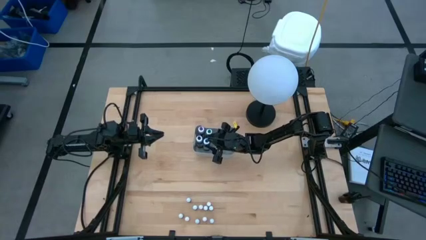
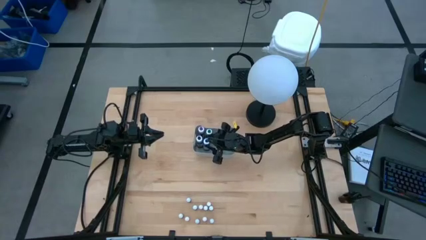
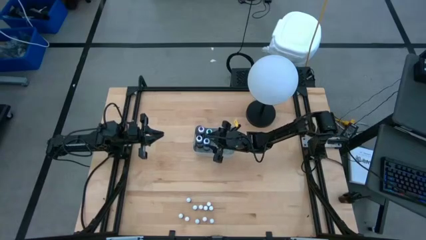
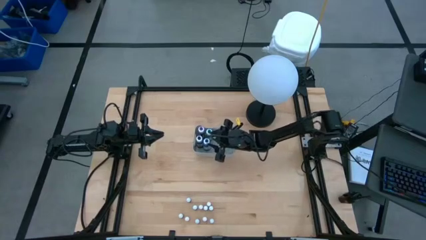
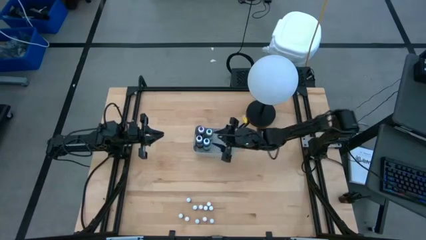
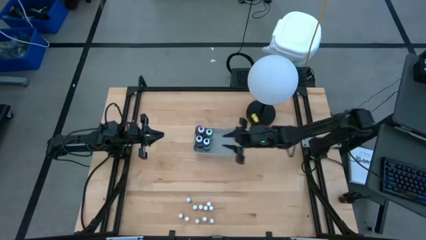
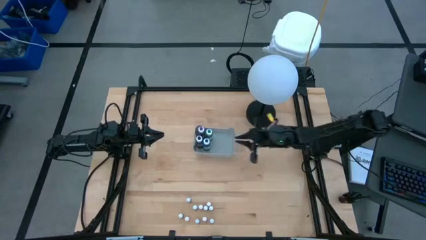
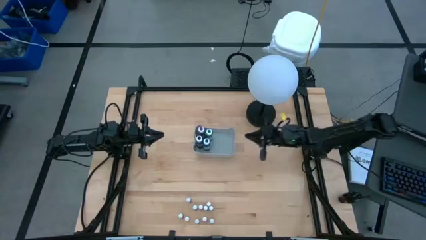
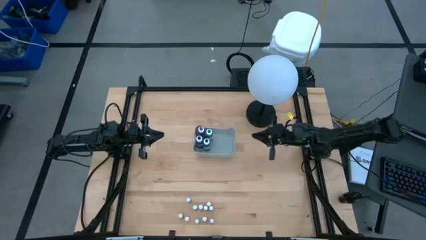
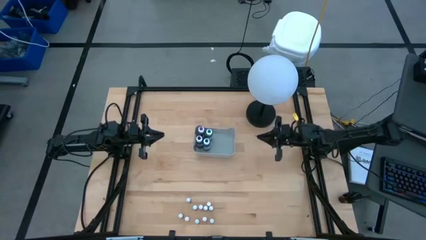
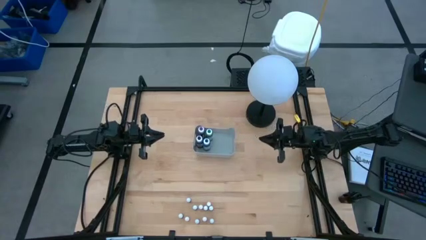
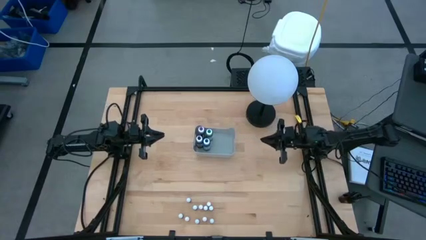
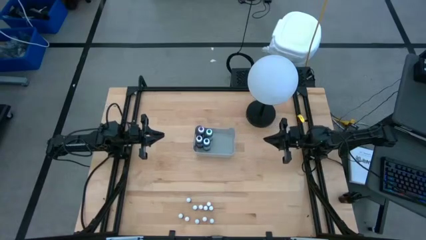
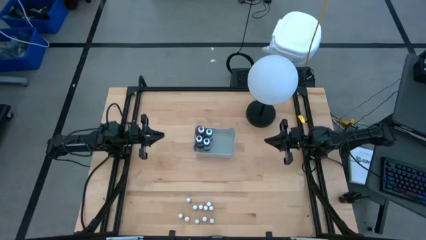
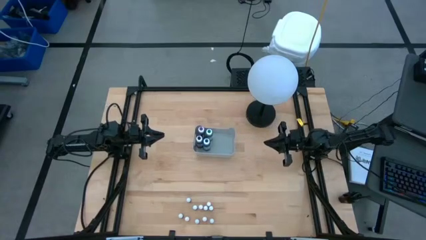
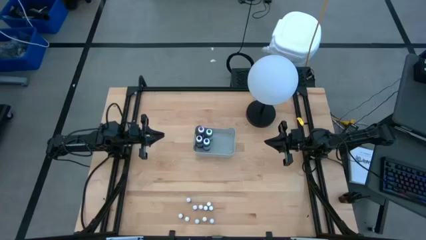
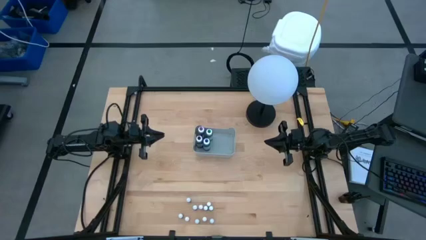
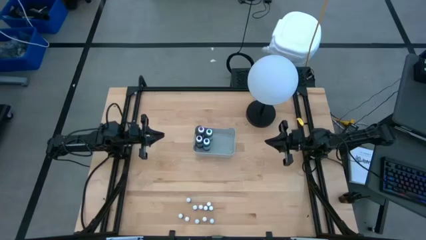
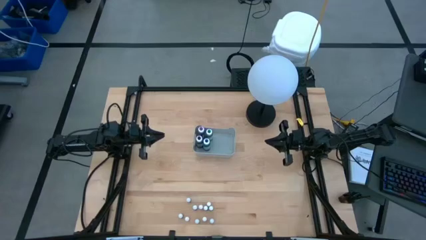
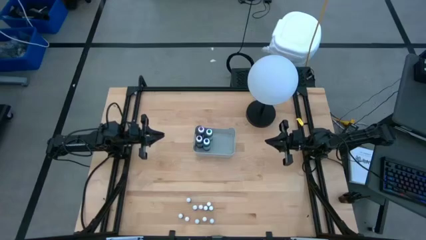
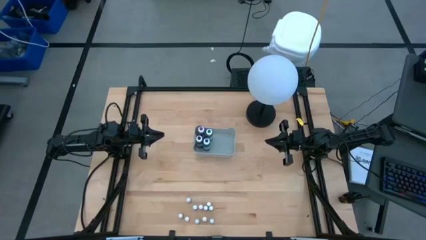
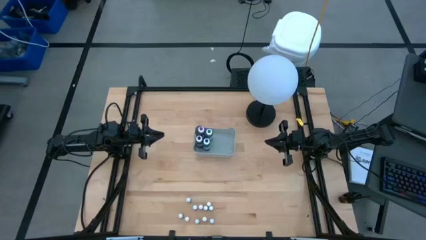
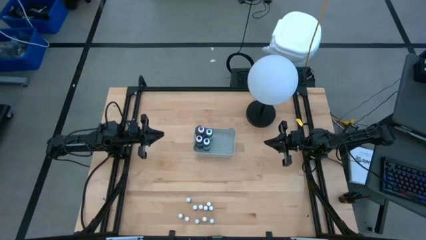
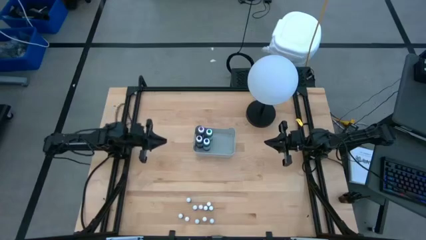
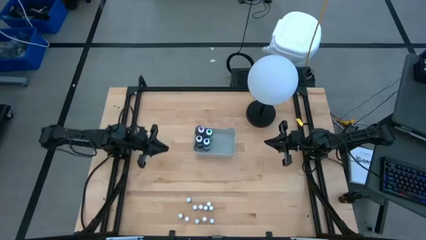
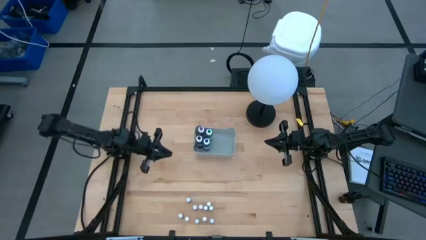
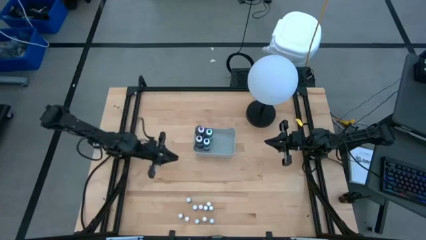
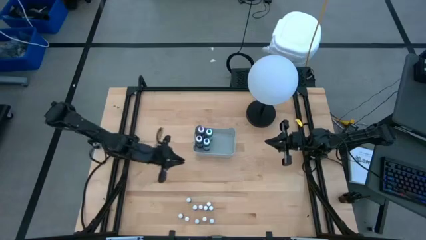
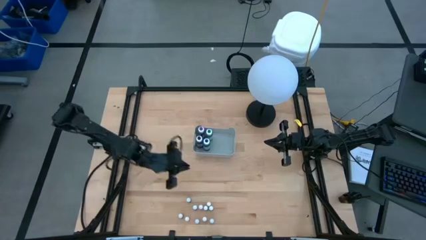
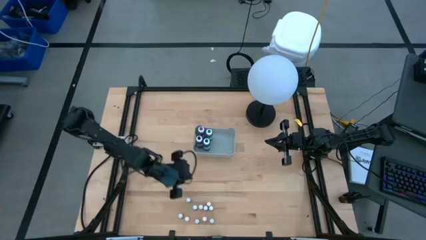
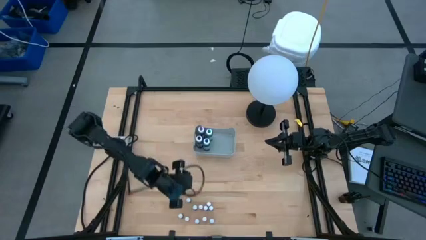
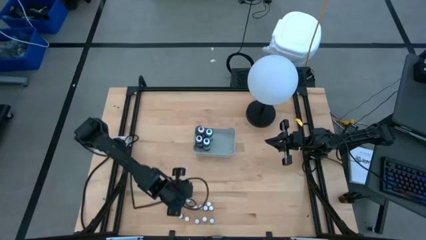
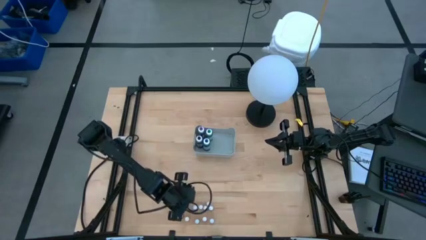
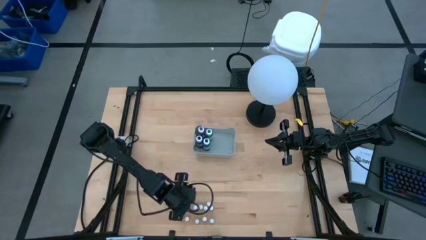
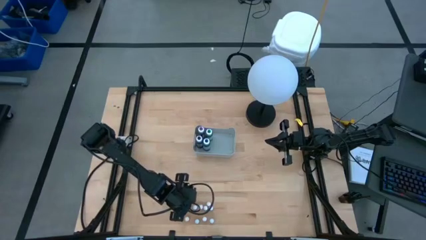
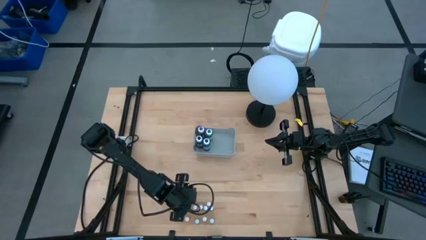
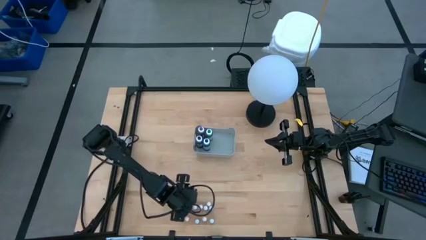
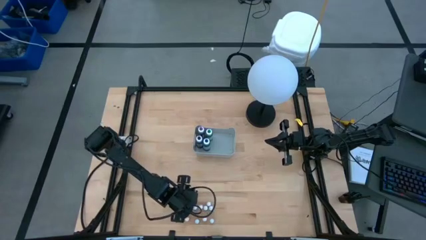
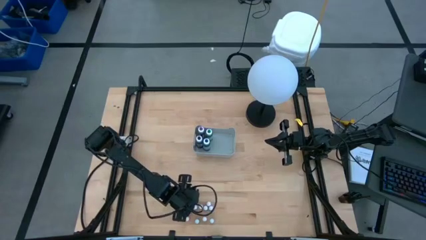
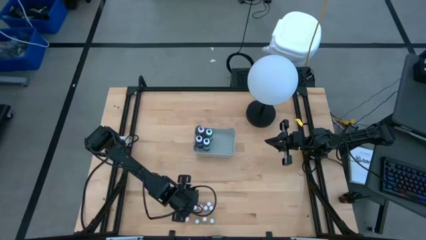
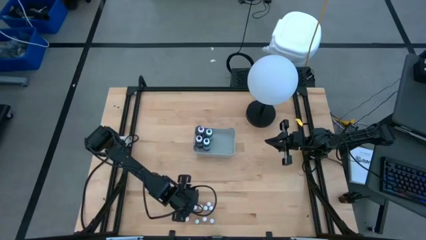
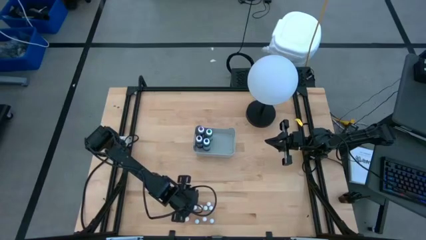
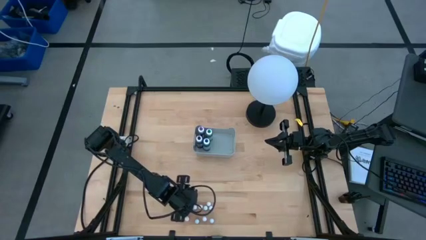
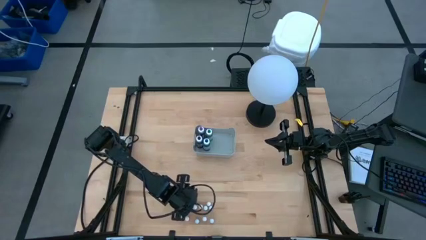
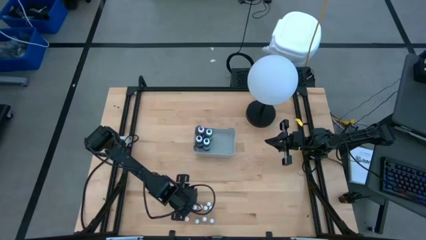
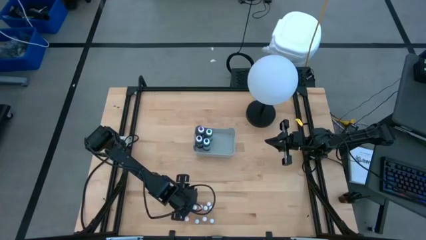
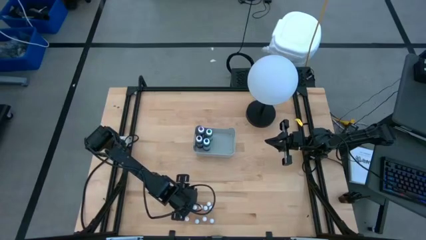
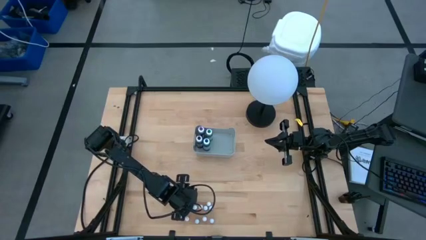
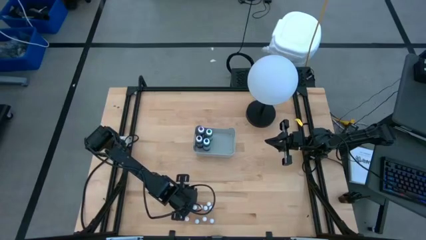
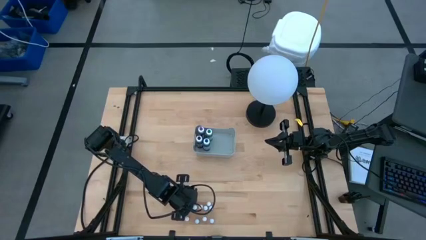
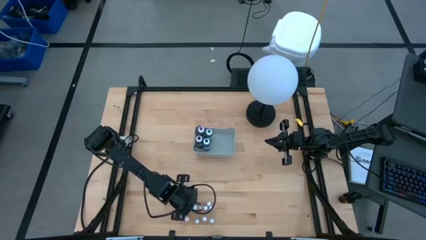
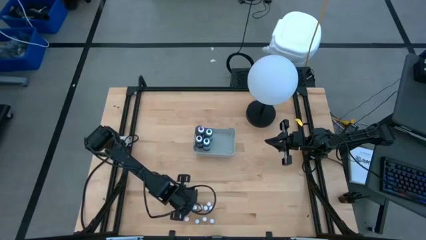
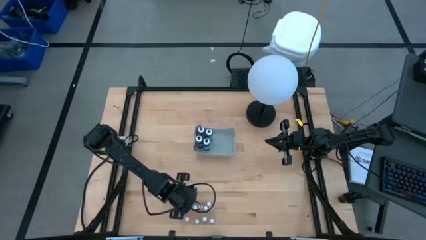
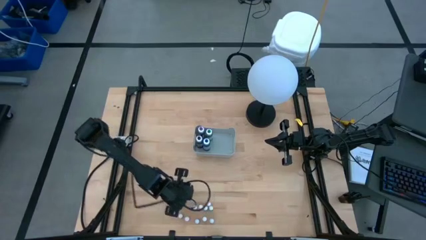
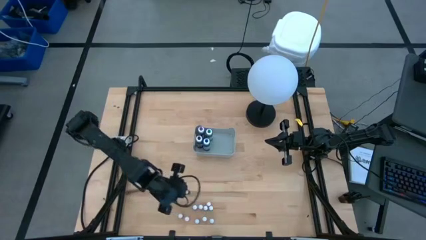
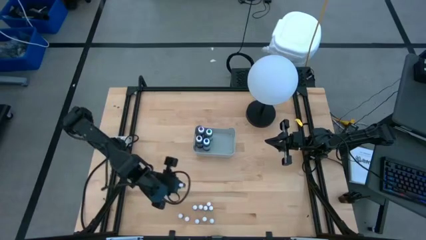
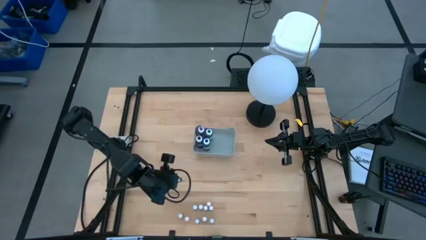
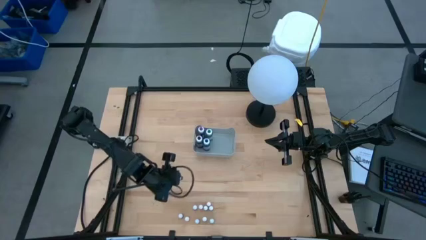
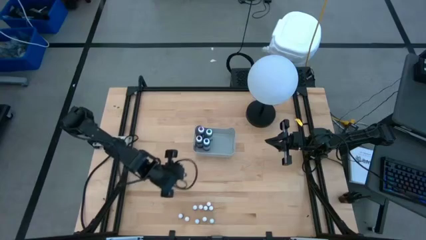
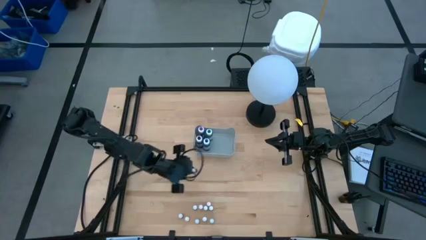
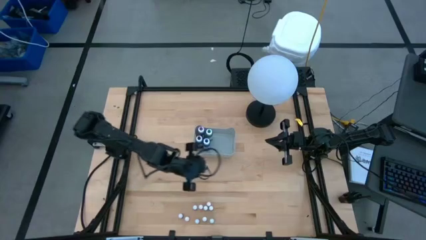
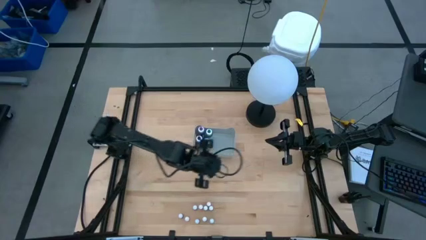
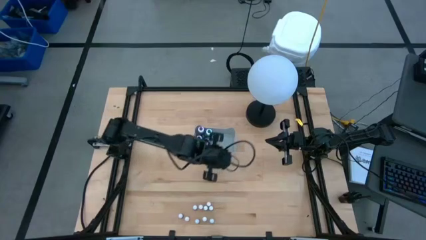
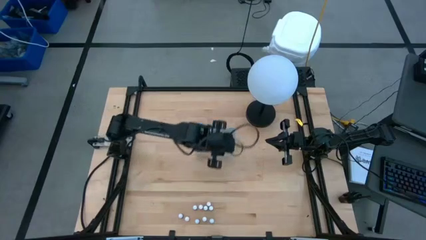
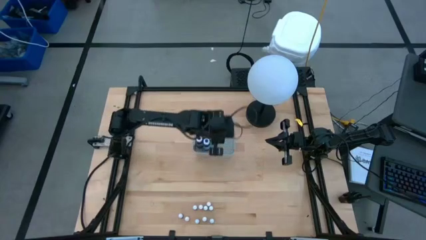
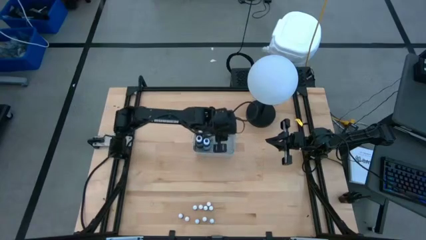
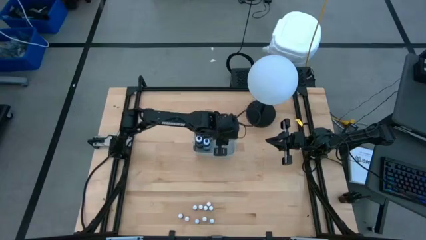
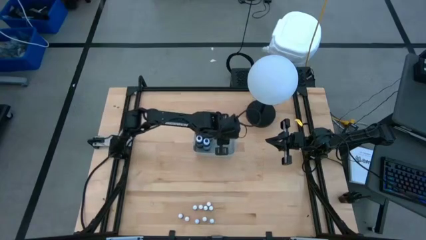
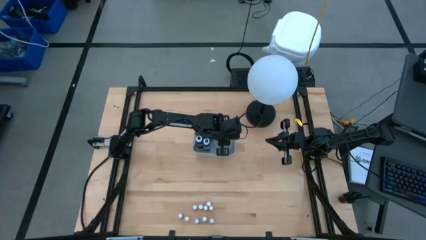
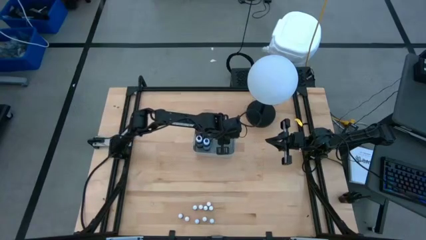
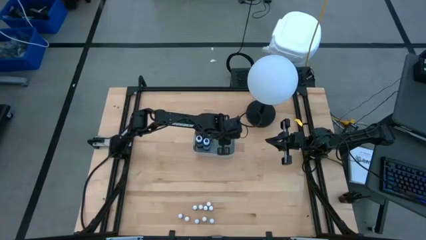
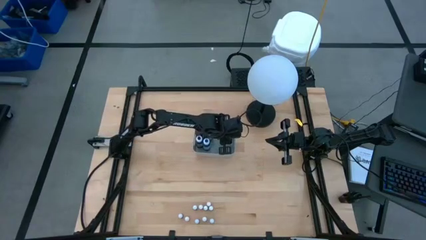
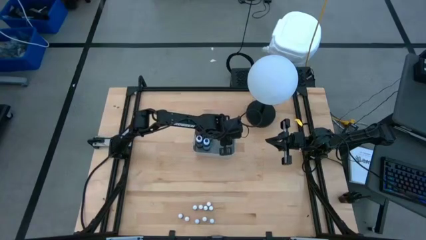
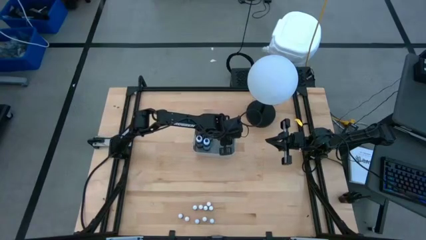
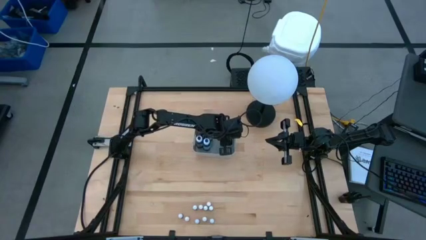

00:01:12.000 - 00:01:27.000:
Task: Pick & Place food coloring
Put the small blue food coloring bottle into the gray bin

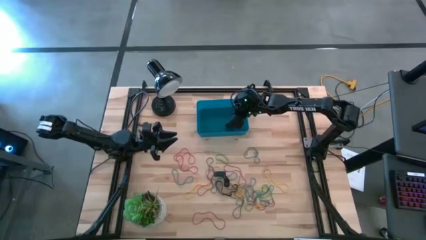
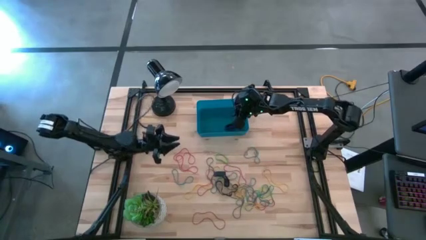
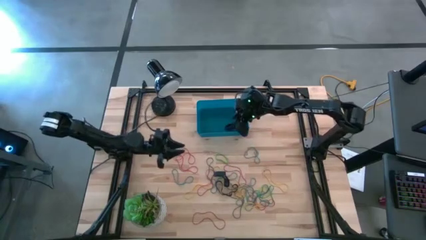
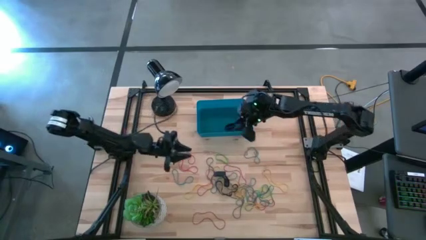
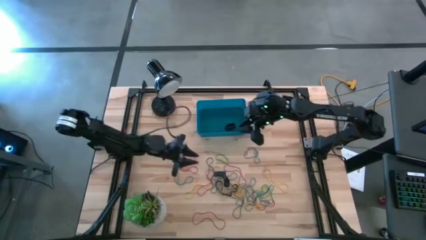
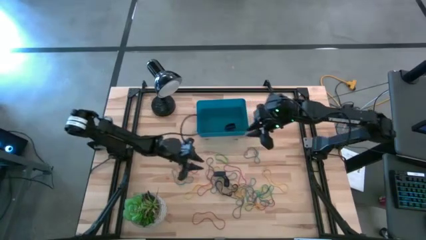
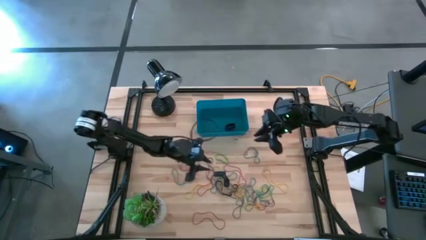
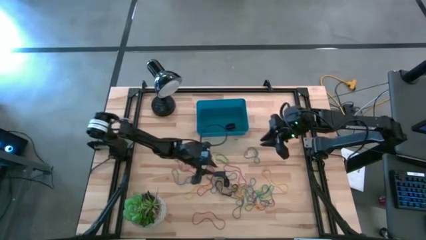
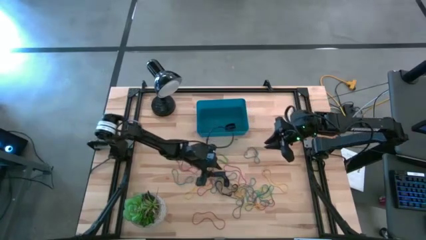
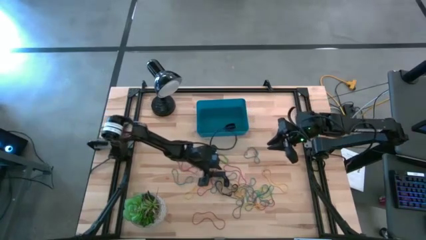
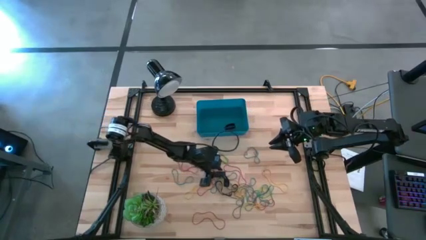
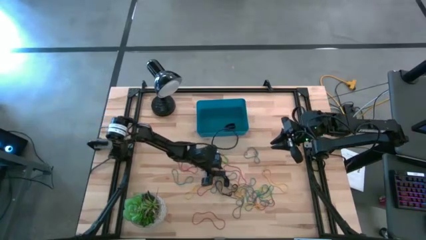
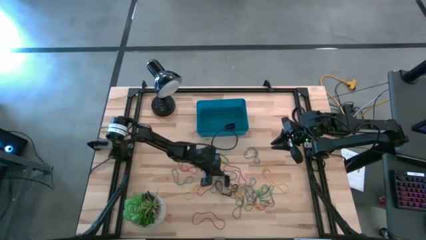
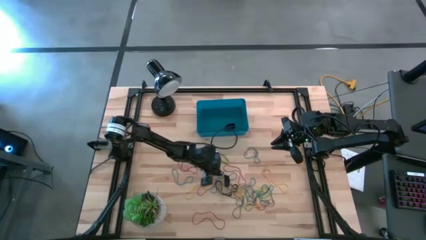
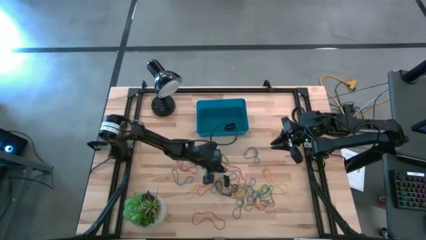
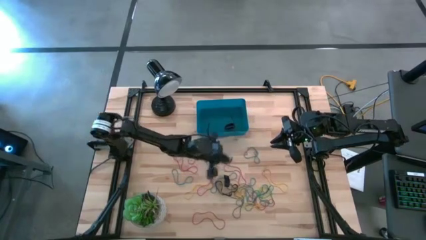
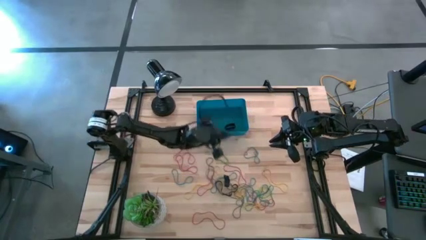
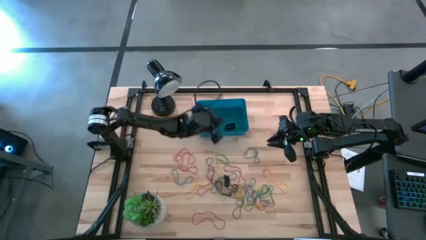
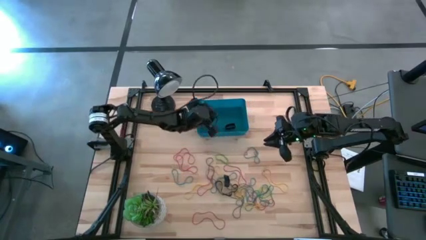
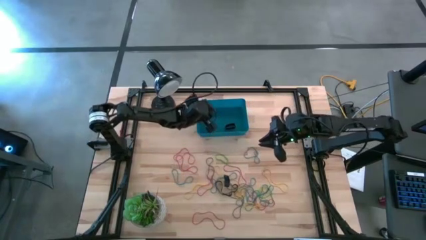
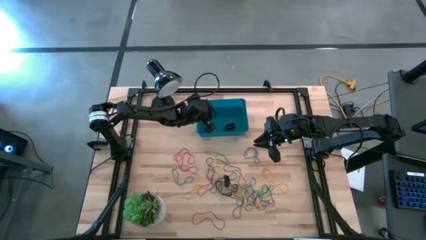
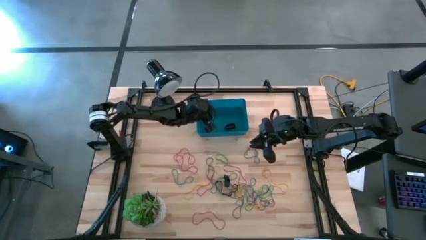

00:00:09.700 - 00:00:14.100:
Task: Pick and place rubber bands into bin
Put the black rubber band into the blue bin
